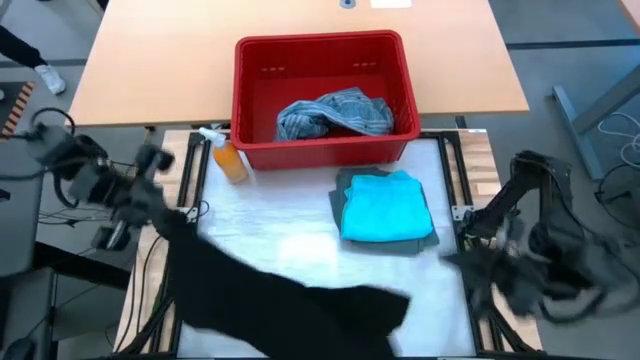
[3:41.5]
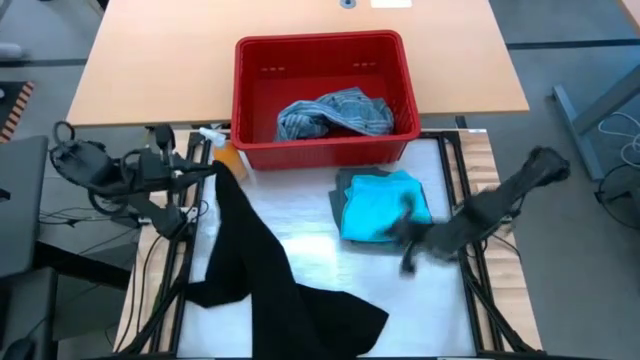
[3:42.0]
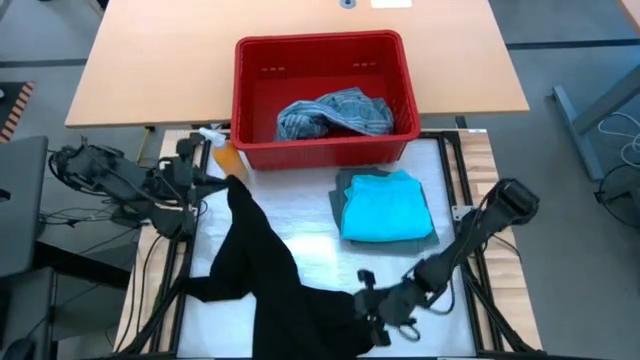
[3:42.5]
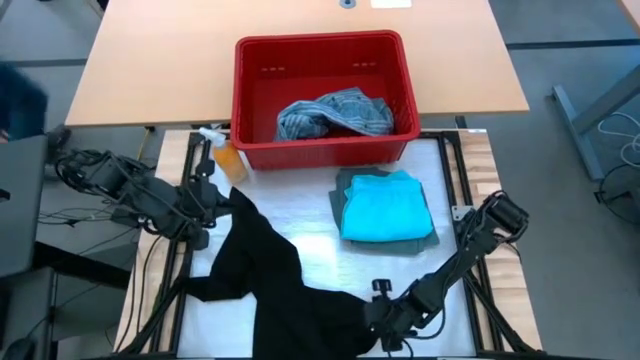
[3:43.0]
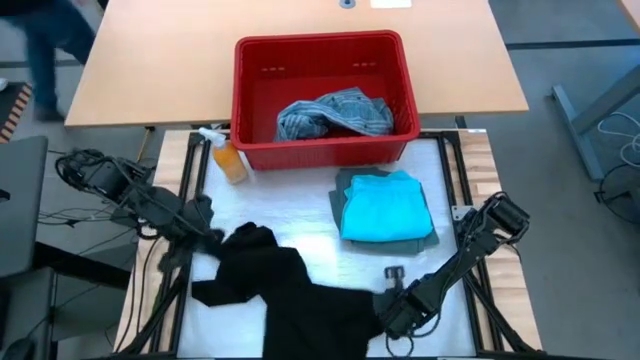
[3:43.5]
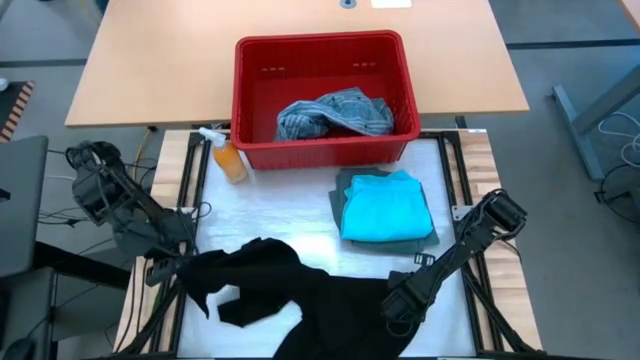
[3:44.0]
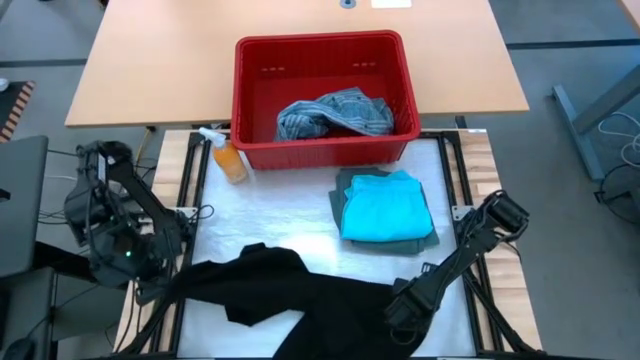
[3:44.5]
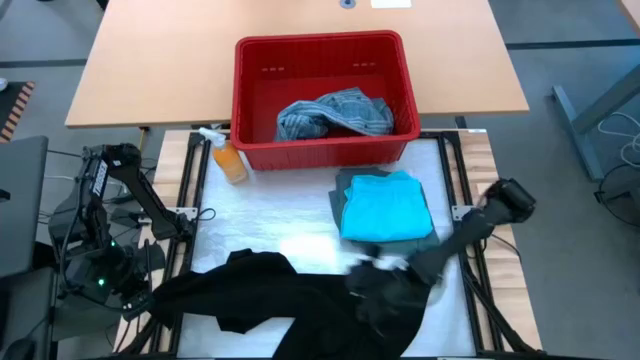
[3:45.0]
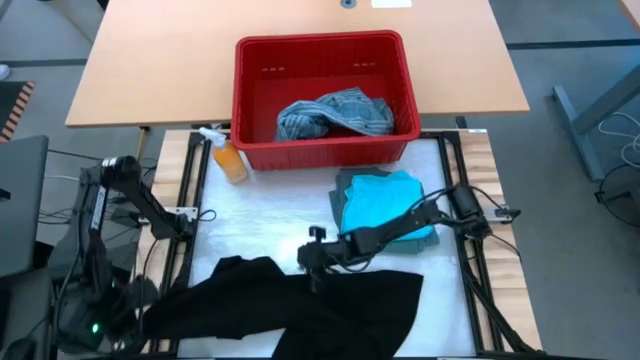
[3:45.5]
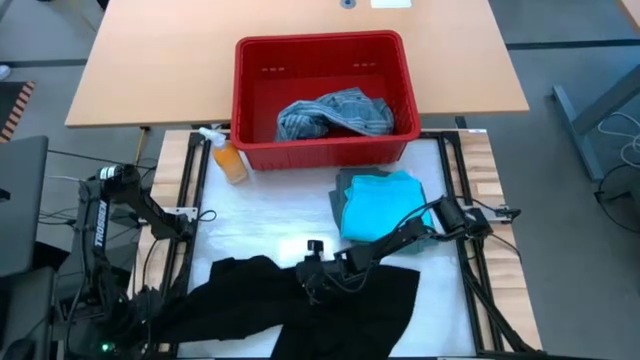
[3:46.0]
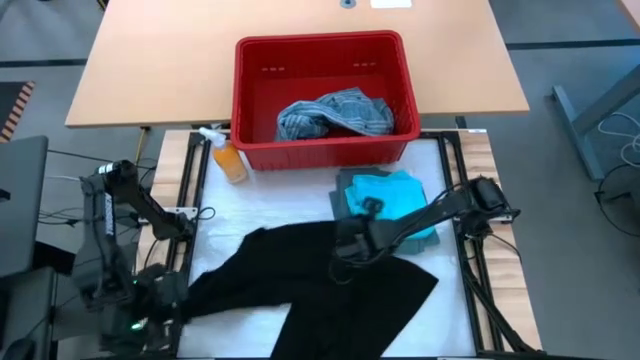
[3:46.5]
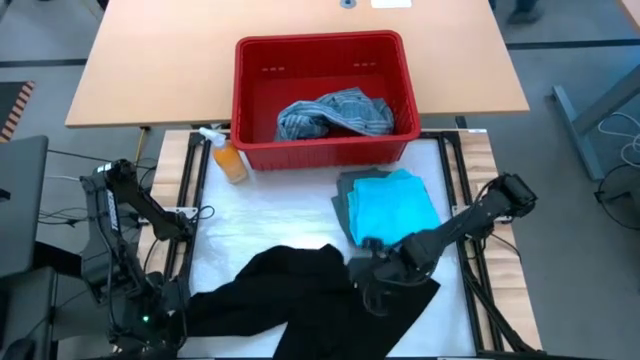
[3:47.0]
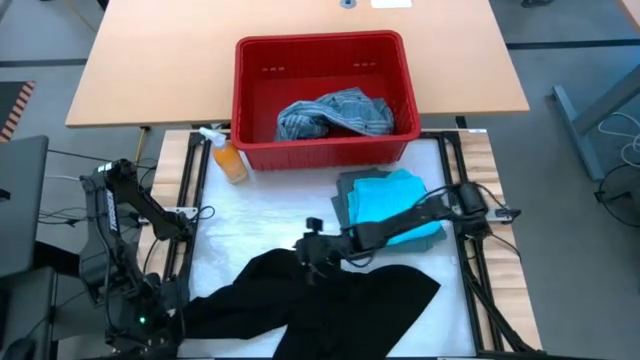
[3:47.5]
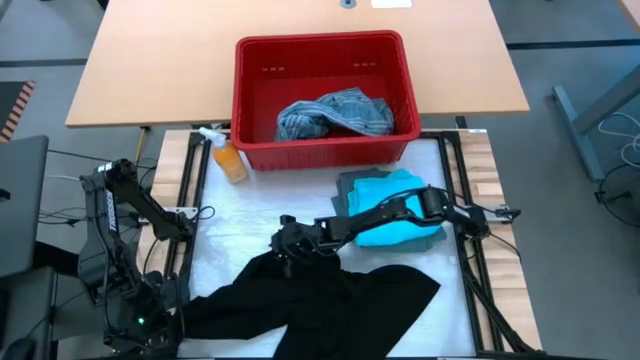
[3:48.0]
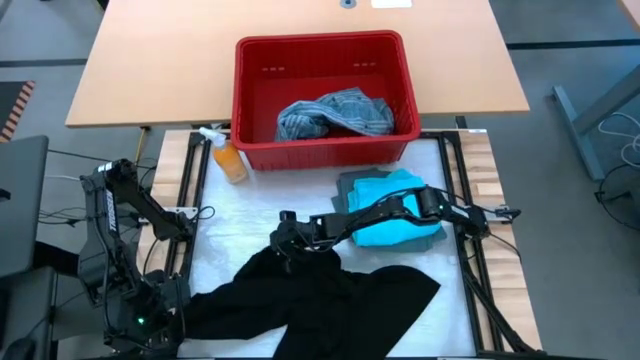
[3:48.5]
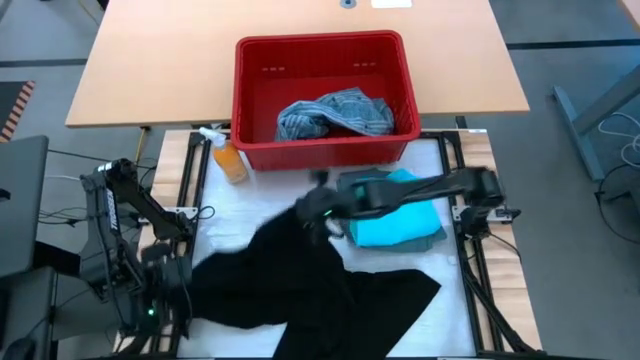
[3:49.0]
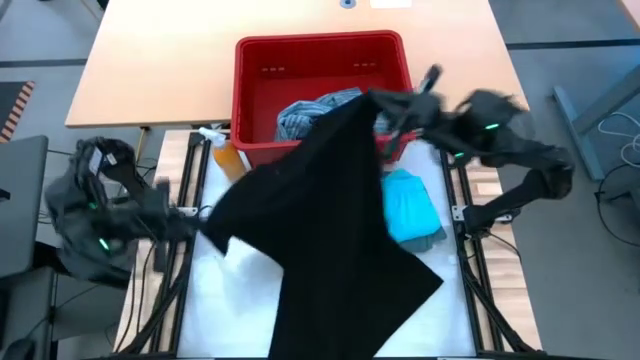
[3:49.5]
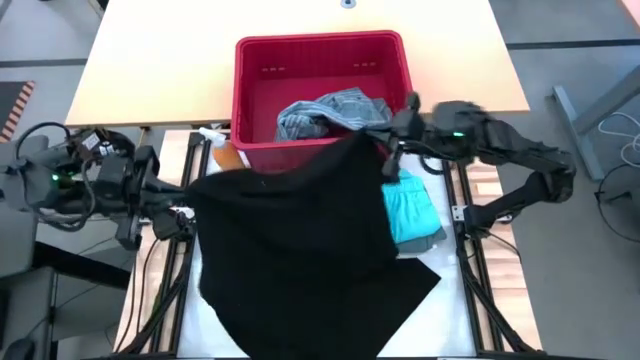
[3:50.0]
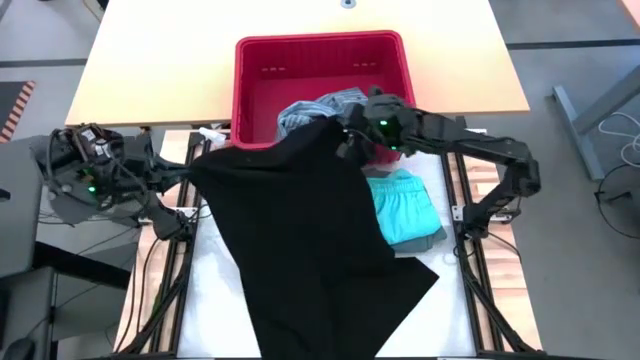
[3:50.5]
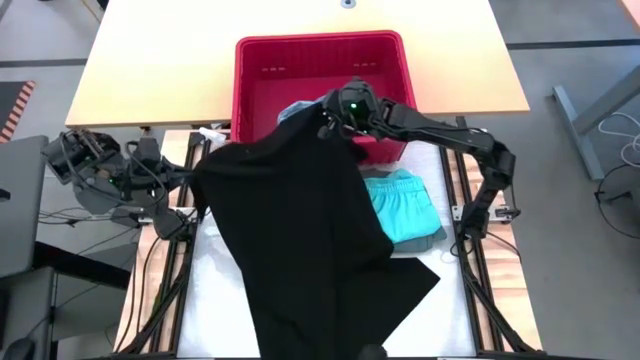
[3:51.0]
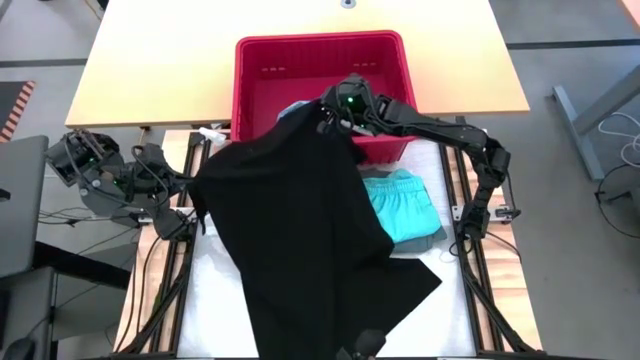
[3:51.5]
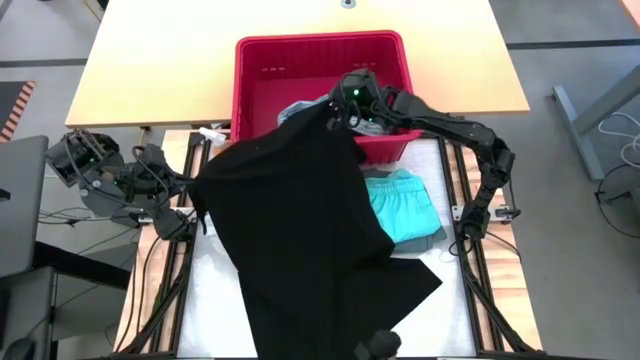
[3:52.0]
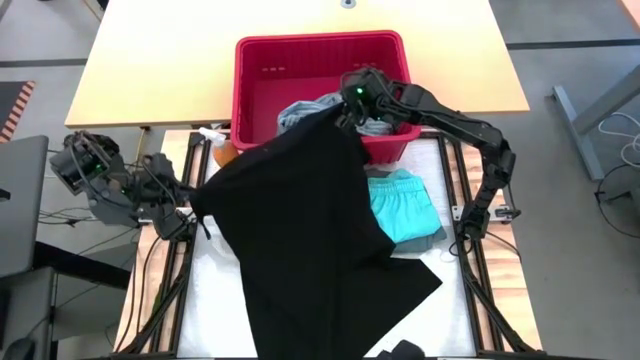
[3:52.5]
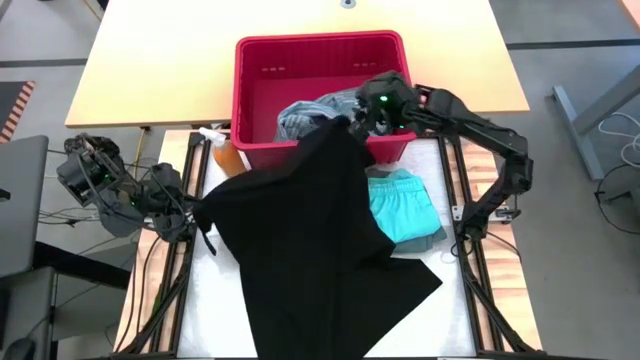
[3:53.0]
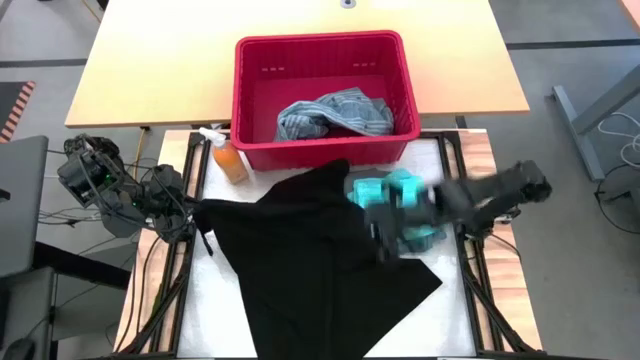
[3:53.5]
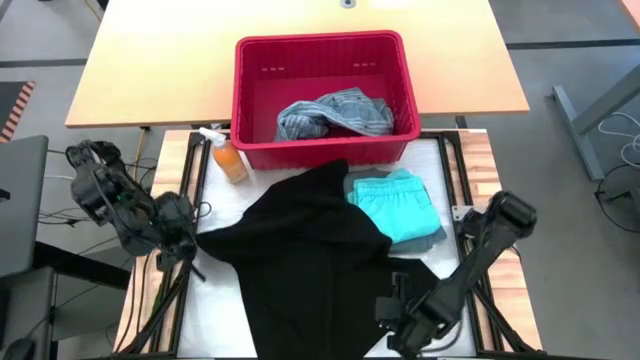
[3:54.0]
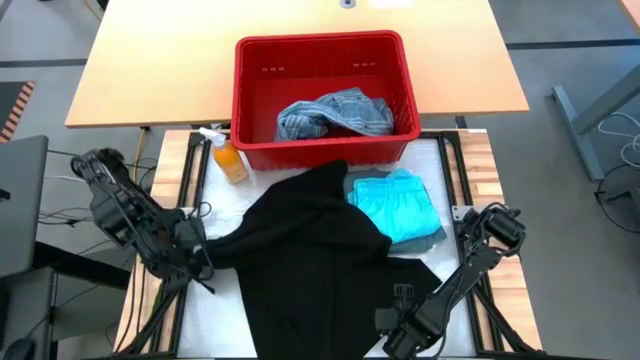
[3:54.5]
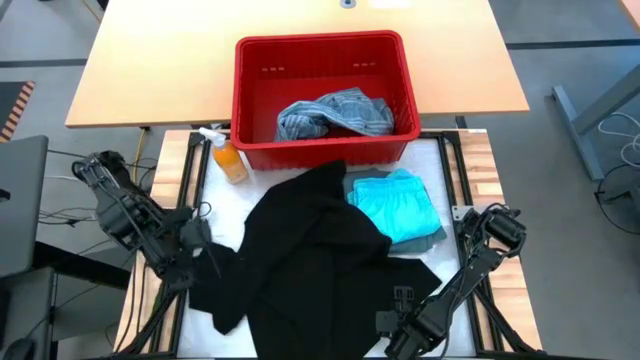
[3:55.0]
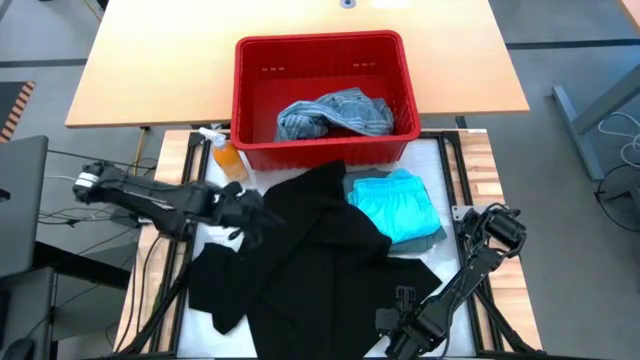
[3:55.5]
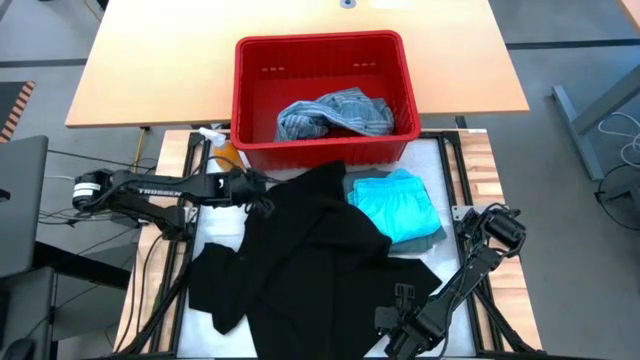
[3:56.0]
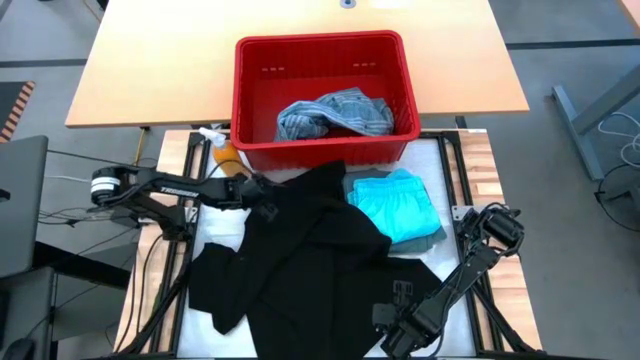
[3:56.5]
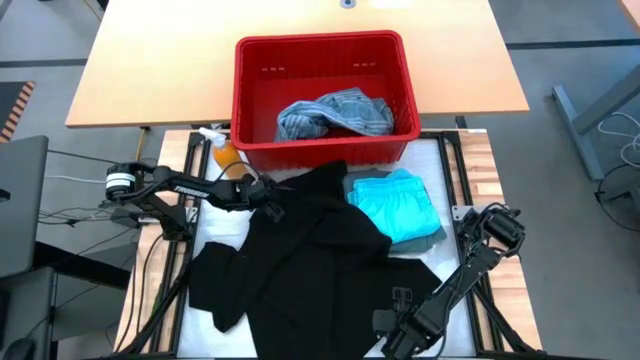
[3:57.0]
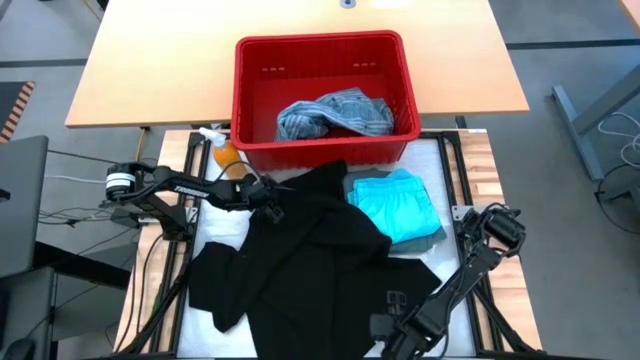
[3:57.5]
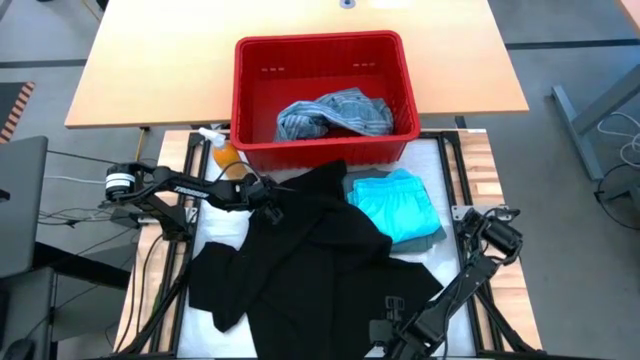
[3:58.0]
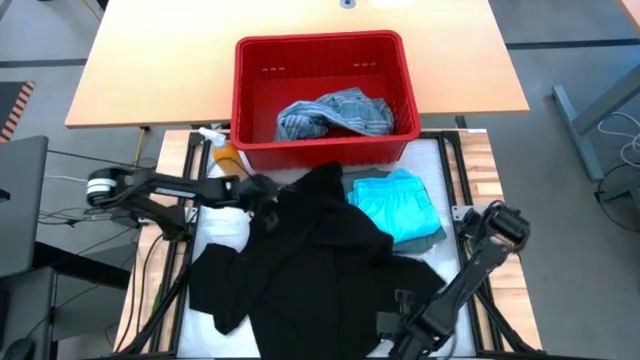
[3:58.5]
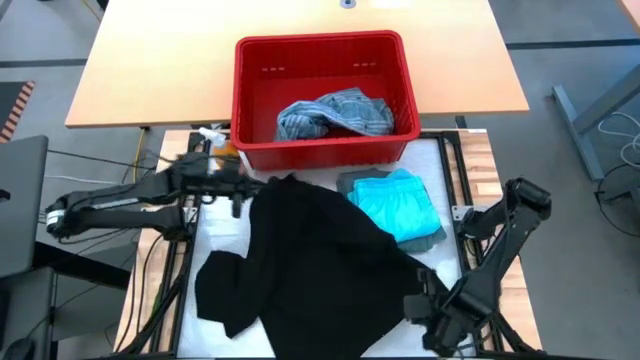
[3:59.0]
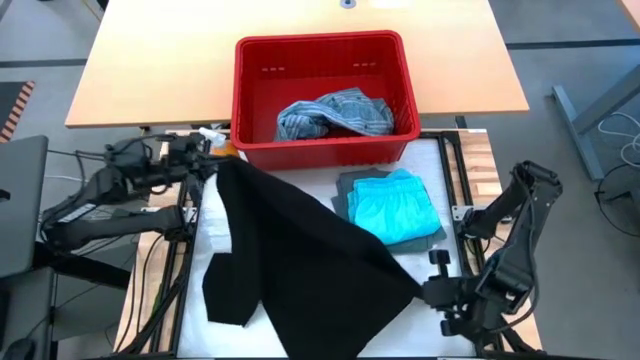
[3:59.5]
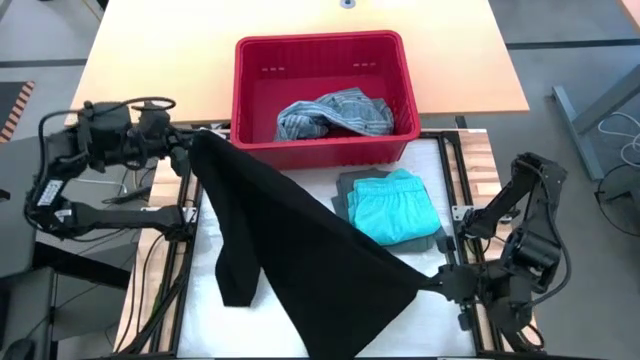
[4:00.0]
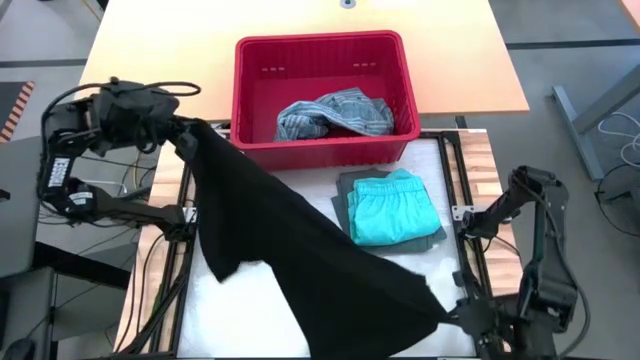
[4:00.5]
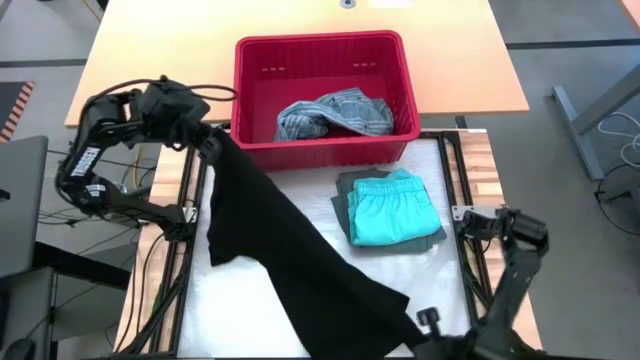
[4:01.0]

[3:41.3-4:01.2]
Task: Fold Laundry from Bin
Fold the black shirt

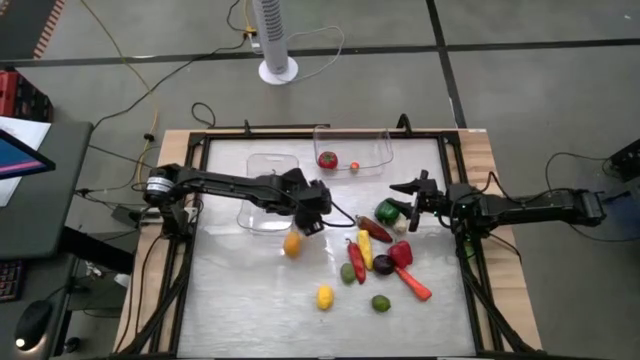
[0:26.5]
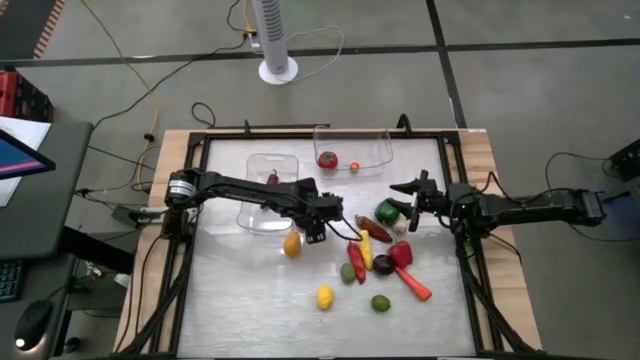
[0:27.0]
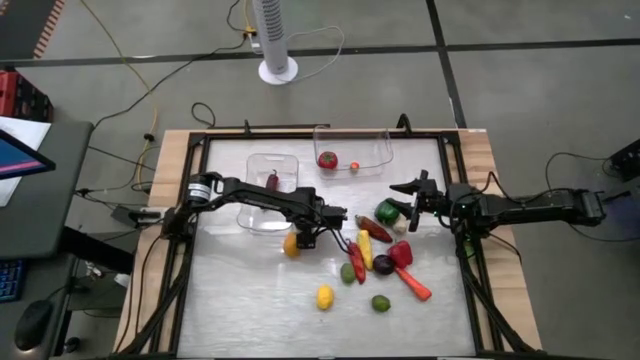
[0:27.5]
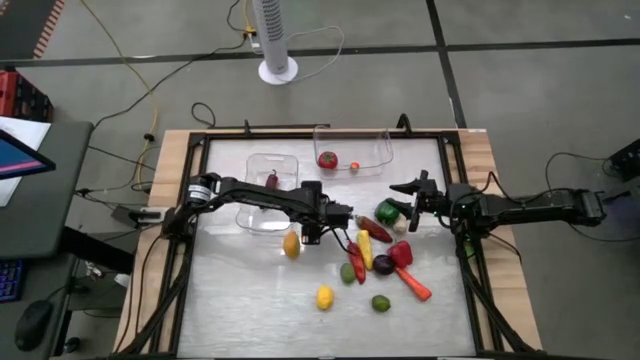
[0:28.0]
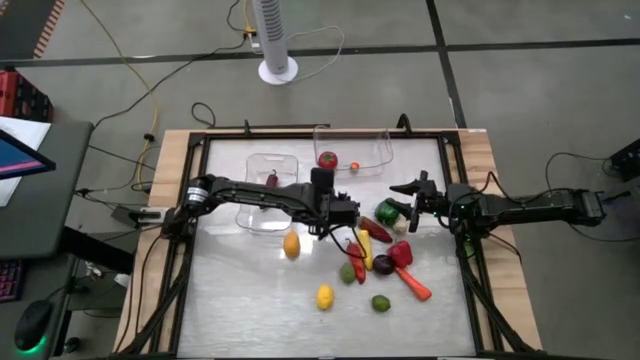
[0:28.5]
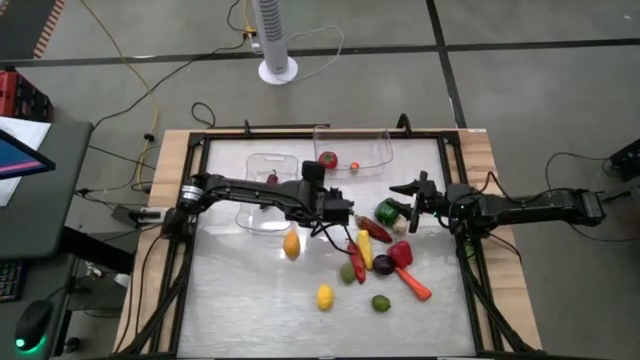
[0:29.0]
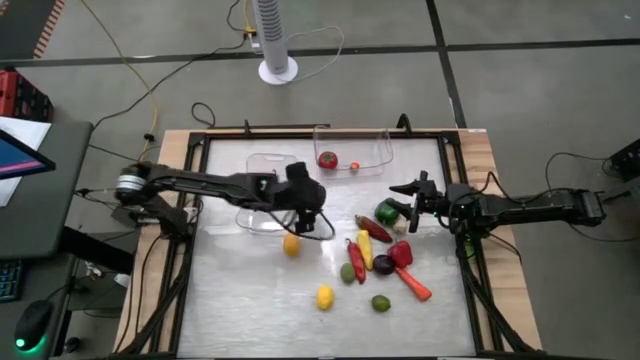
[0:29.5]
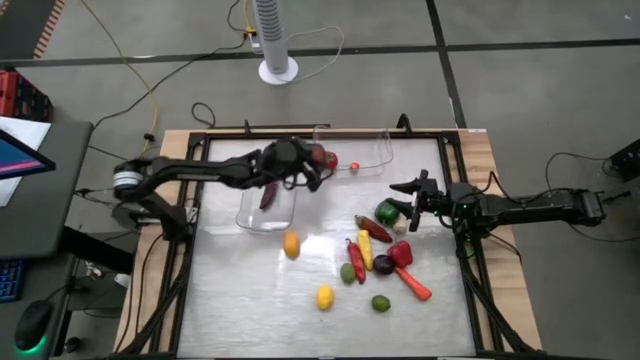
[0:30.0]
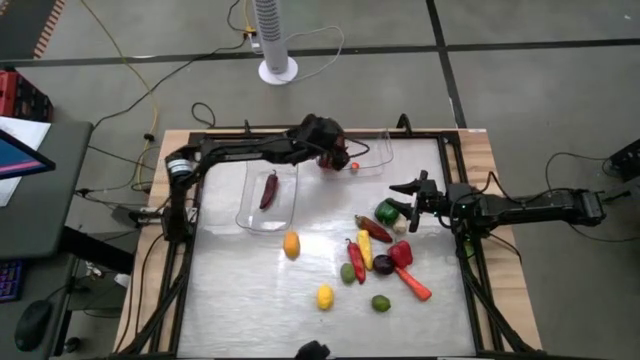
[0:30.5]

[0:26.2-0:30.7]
Task: Sort produce into baskets
Put the red apple into the right transparent bin
